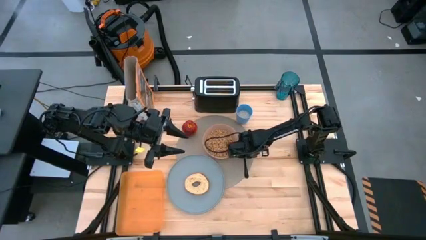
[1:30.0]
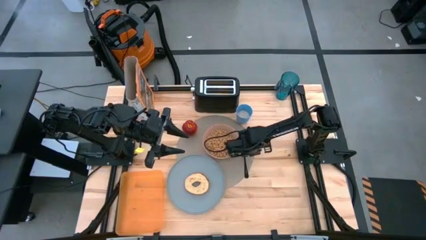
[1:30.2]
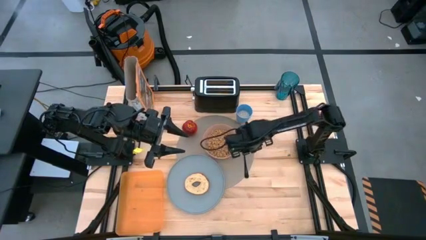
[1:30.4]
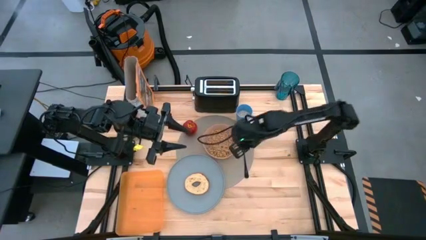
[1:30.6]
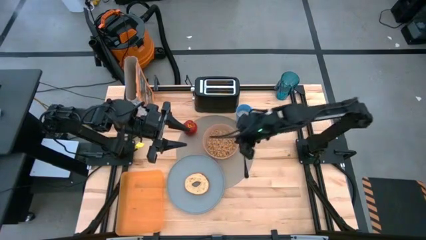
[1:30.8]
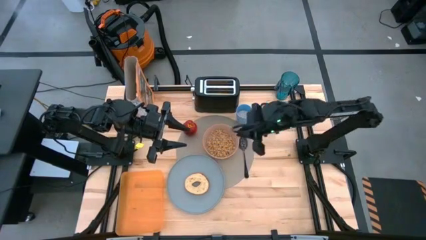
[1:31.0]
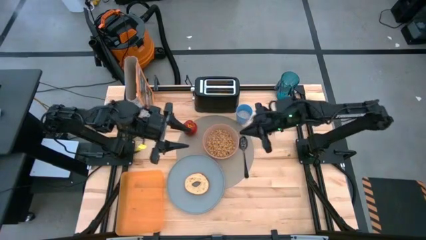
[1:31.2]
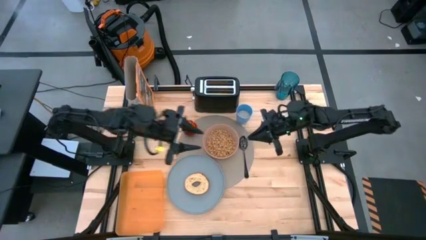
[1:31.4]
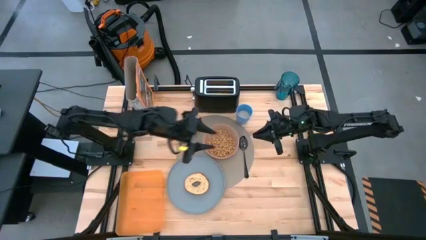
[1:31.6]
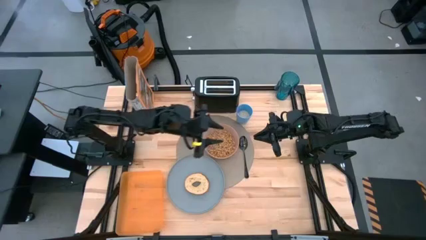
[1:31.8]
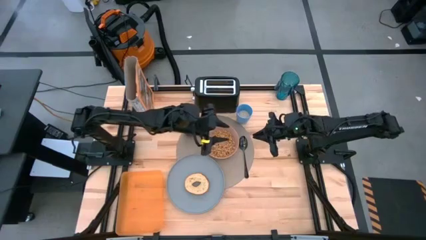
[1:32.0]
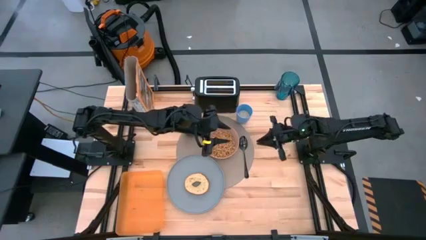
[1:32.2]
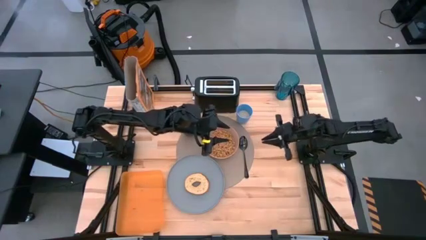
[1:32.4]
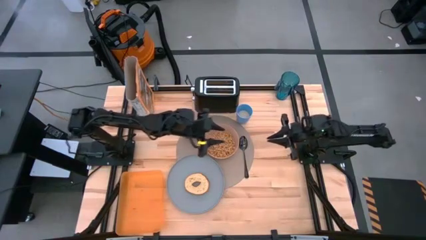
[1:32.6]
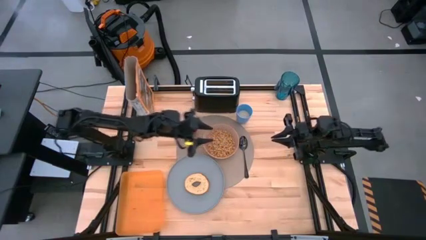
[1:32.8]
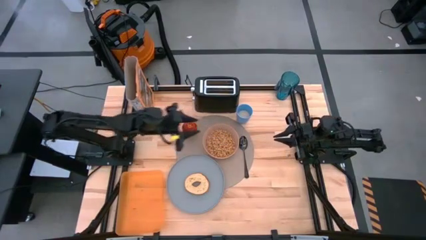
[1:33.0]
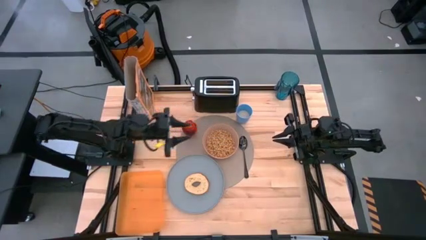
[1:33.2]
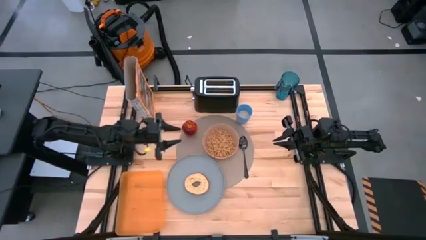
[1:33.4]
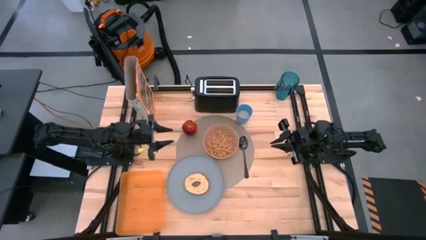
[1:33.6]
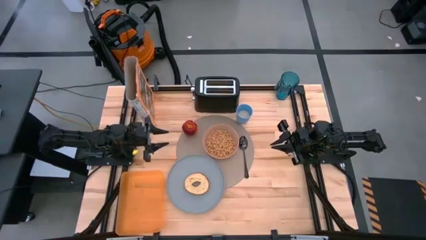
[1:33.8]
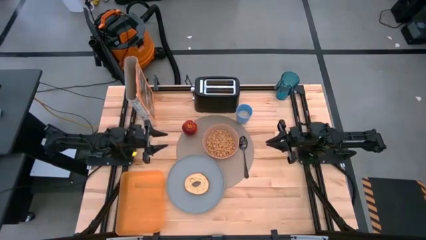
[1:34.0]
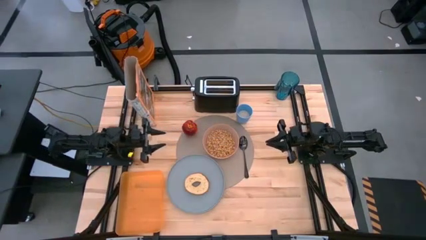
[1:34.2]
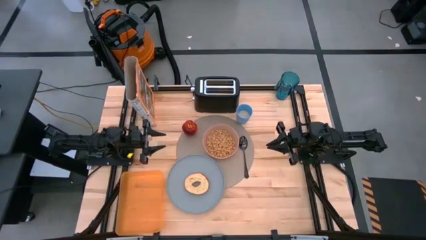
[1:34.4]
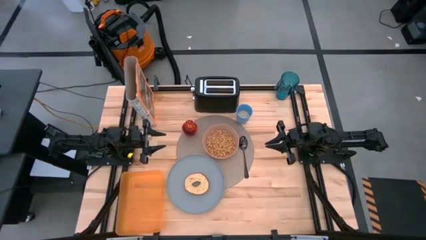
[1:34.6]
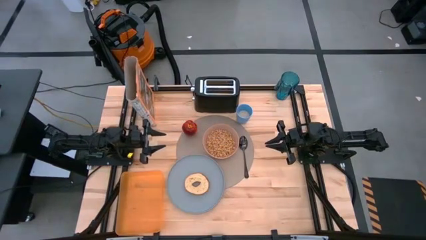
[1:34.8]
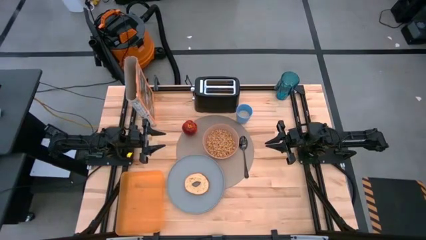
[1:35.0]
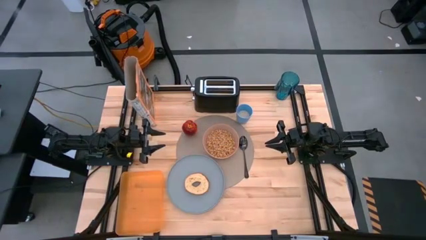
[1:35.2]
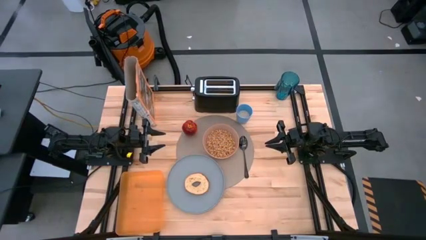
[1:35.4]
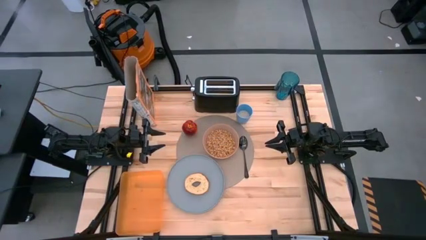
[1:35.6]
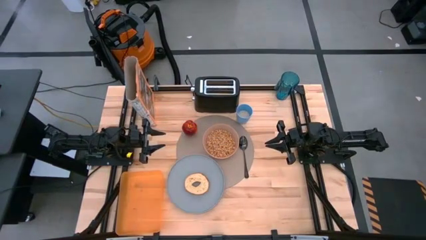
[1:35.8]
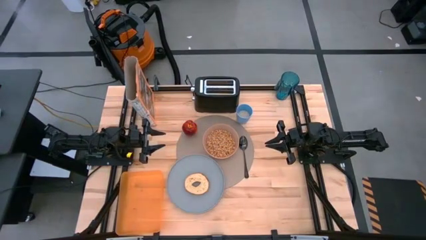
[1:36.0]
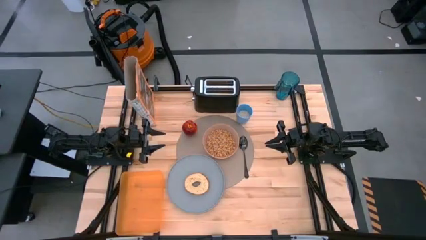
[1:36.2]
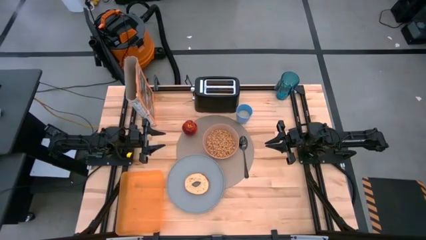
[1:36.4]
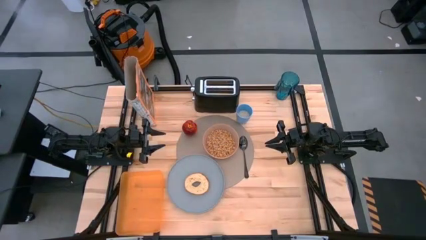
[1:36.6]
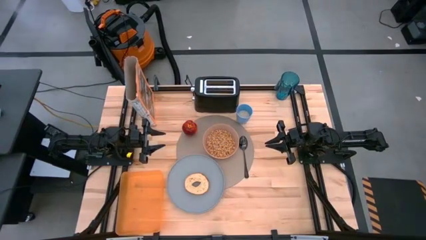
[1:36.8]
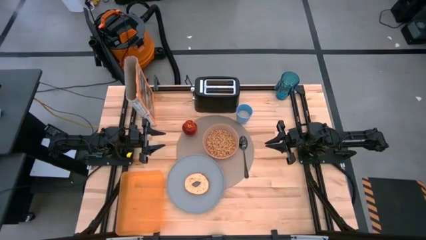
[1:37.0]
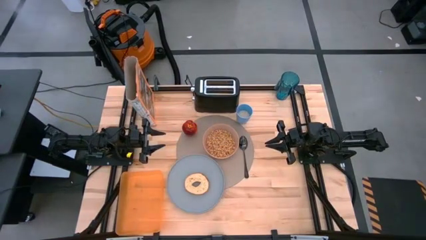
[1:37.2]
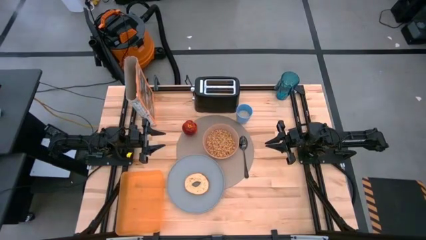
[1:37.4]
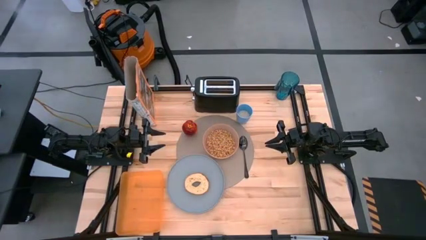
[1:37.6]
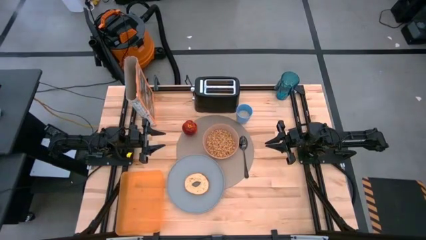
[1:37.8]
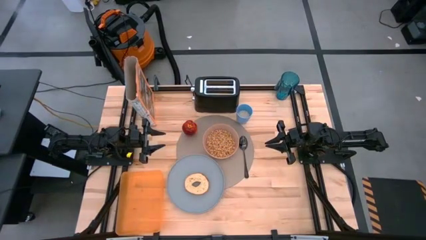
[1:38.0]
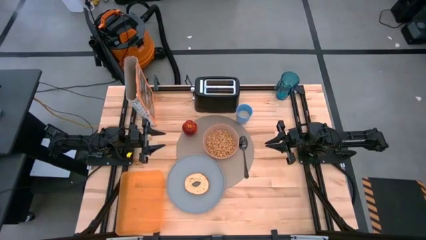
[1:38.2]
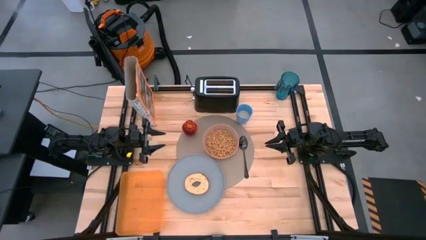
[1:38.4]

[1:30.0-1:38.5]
Task: Arrange a breakfast setting
Return to Home Position

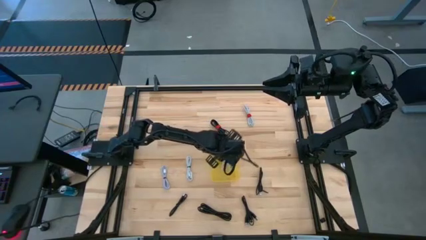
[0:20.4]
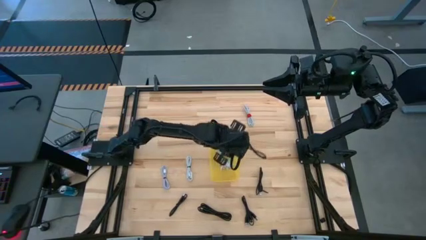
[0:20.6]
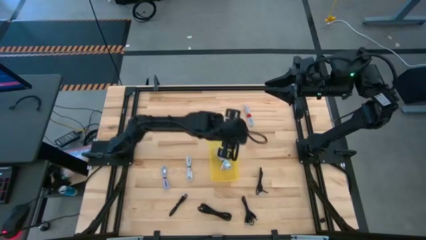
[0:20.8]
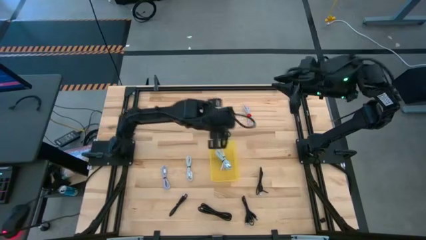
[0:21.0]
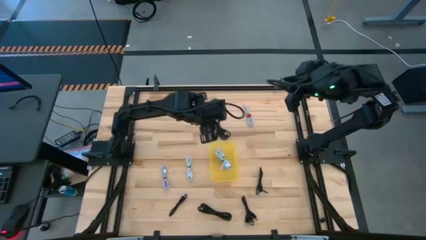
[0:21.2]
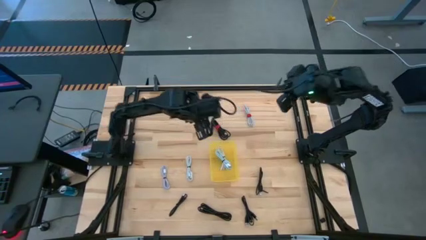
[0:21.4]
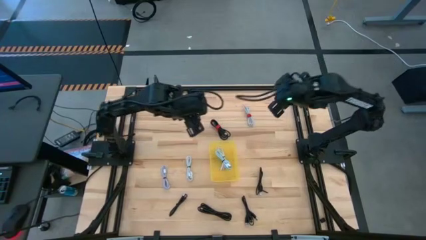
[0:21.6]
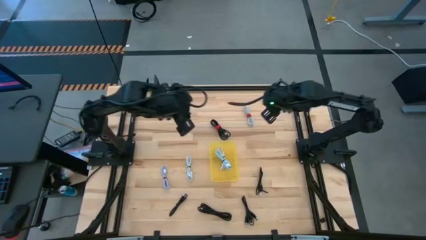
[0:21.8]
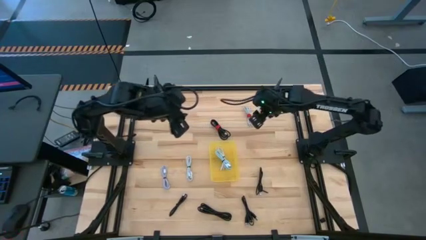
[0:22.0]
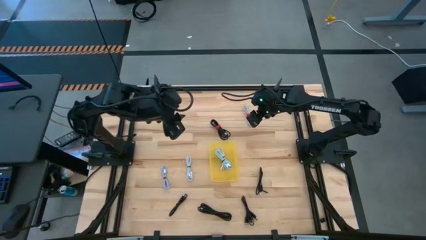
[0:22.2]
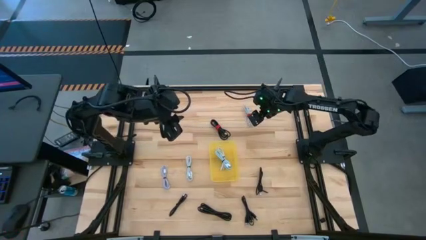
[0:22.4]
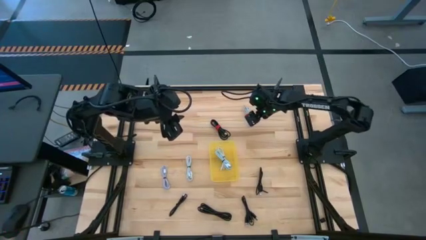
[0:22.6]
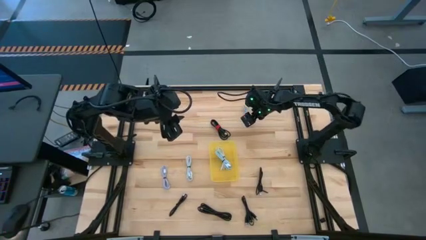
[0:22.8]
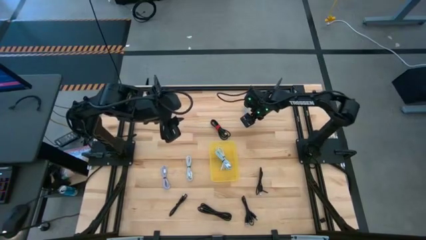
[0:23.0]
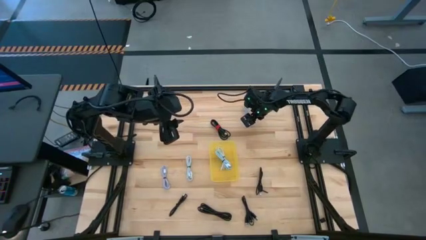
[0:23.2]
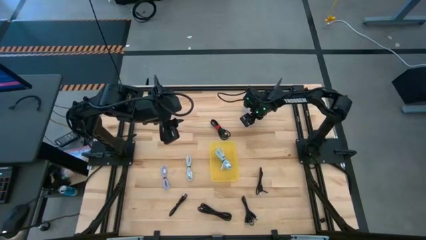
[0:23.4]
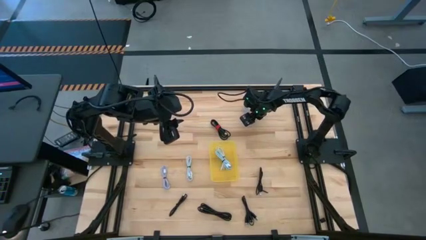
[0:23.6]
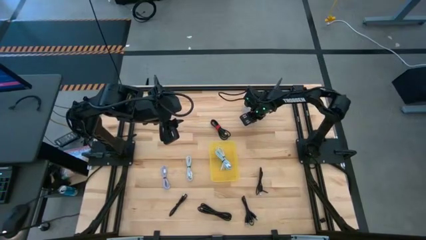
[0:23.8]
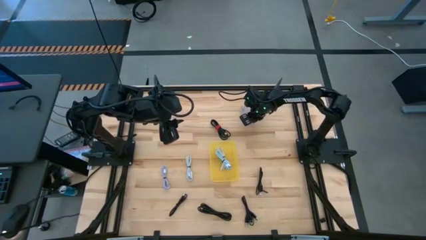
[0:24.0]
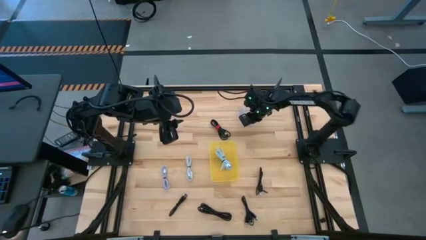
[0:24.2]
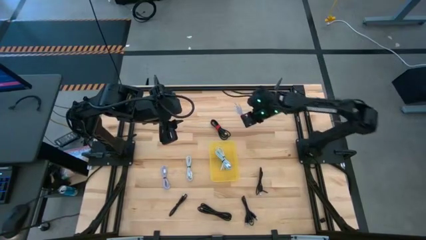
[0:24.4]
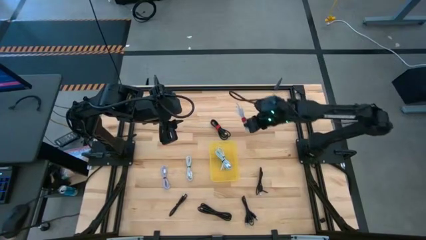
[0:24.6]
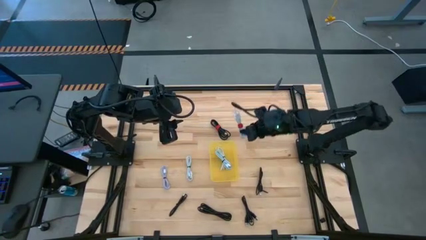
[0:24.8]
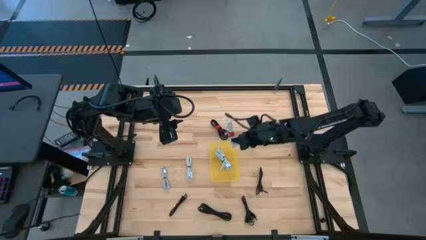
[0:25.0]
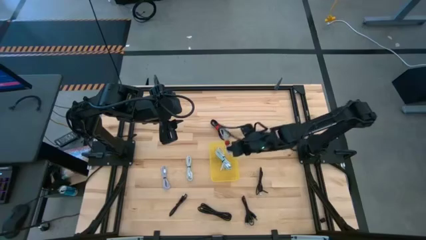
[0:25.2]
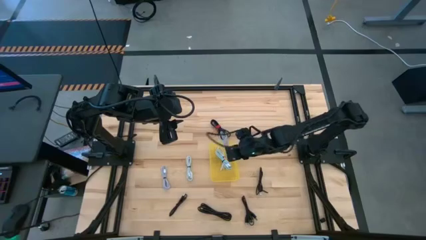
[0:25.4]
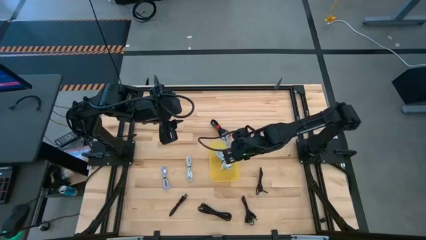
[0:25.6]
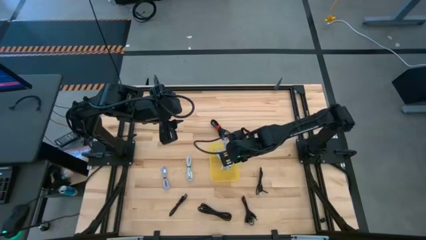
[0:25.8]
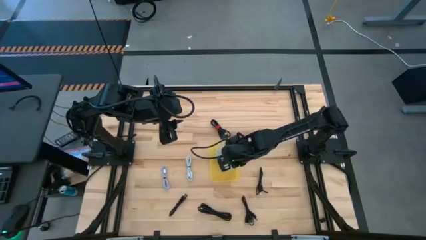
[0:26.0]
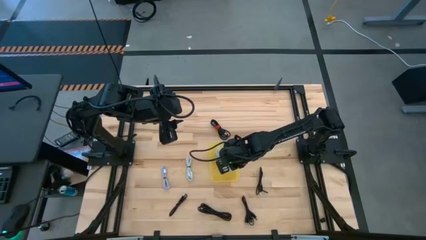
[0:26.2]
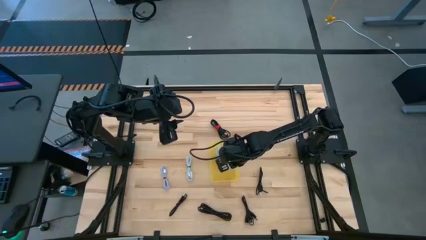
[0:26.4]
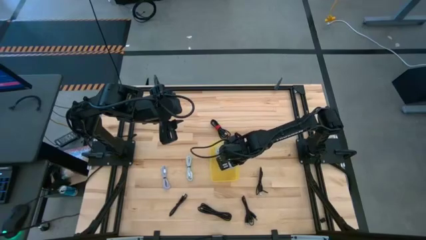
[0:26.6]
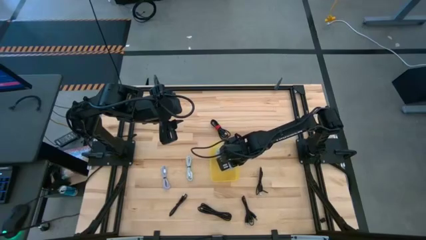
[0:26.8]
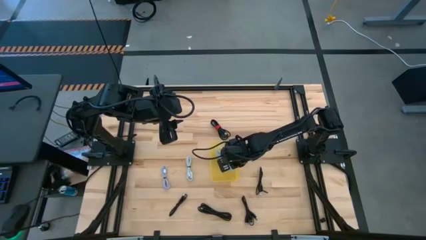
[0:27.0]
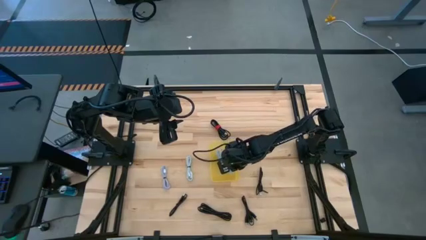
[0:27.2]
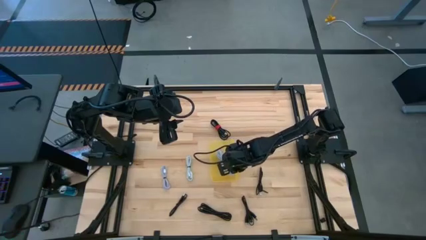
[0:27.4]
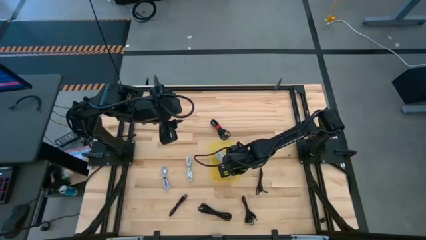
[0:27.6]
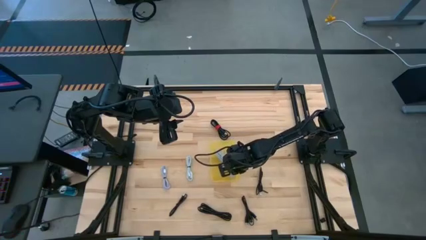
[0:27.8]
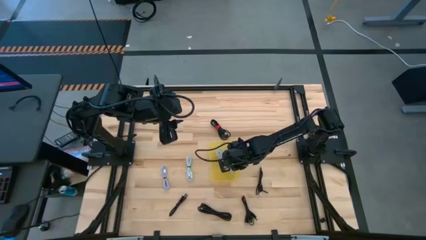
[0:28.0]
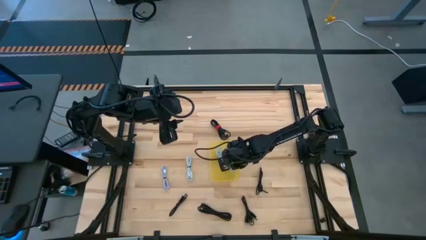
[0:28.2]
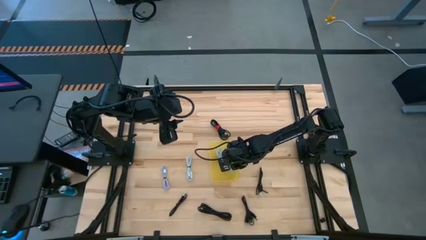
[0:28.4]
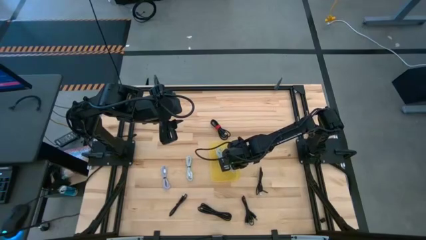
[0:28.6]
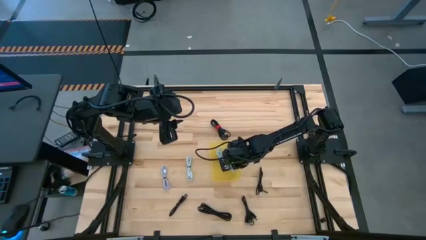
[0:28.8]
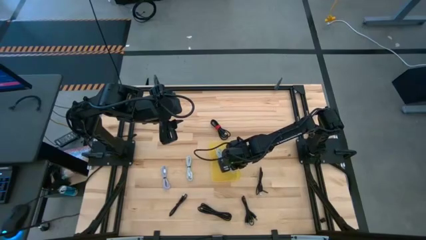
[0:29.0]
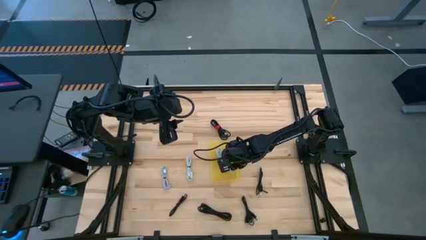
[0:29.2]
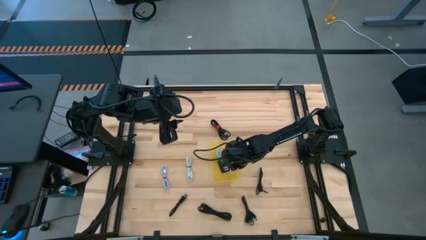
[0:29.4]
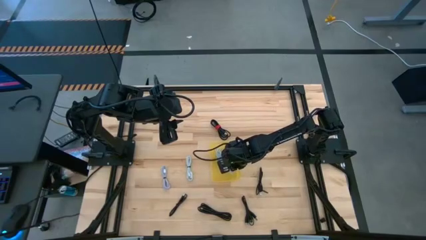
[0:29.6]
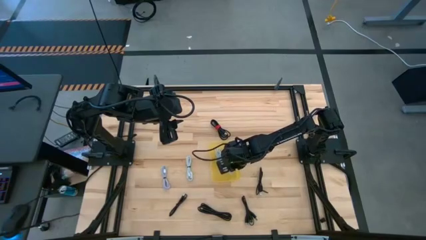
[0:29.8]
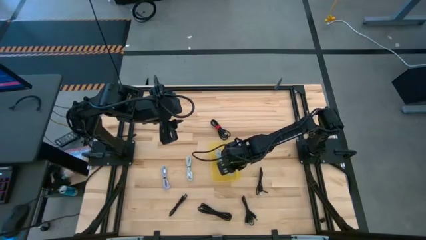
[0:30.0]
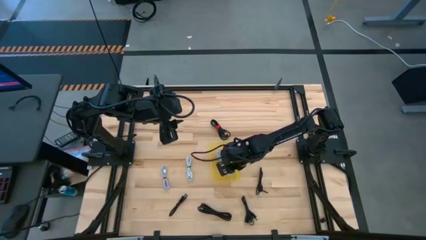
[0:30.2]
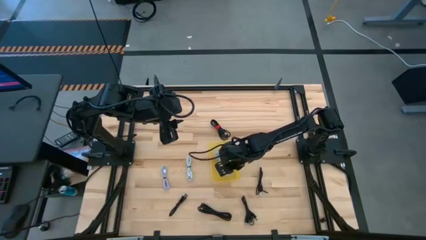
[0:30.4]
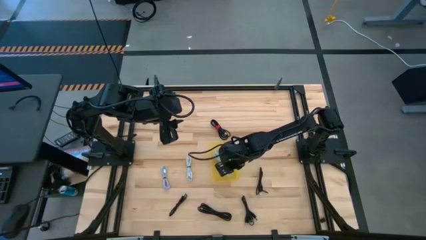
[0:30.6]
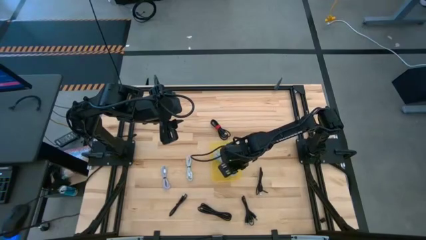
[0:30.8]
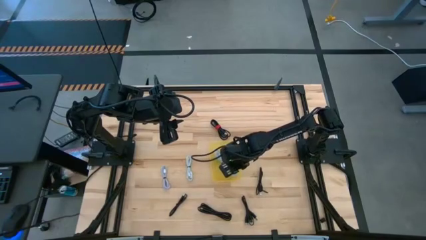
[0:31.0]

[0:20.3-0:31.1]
Task: Pick and place USB-C Cables
Put the white charger cable into the yellow bin
